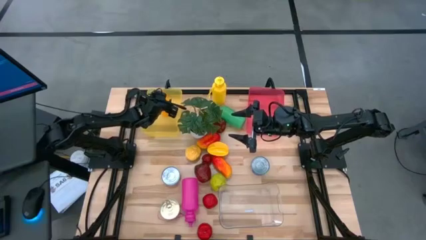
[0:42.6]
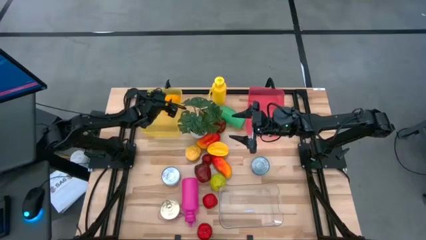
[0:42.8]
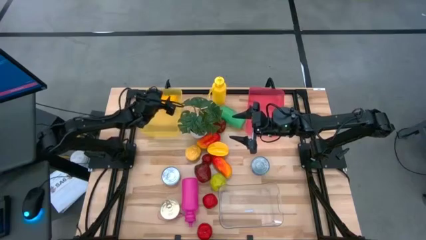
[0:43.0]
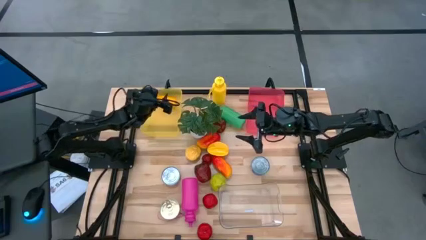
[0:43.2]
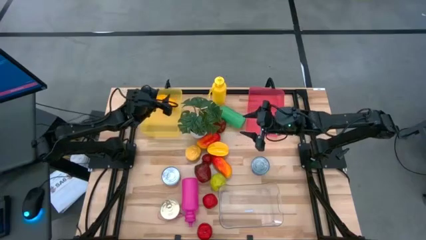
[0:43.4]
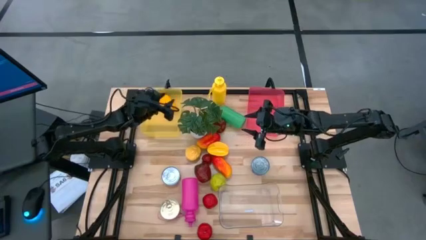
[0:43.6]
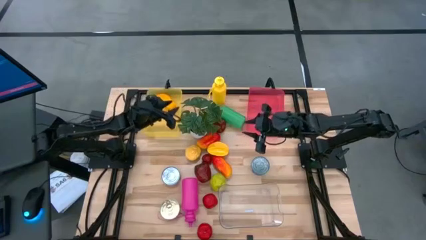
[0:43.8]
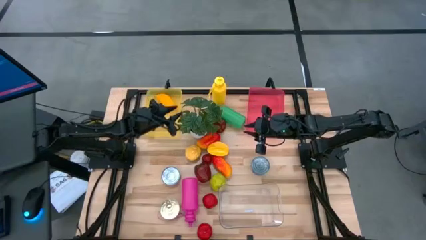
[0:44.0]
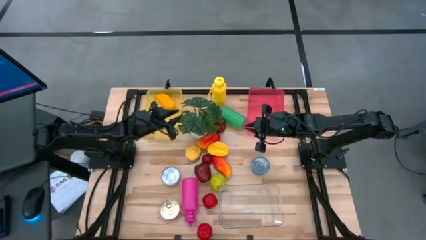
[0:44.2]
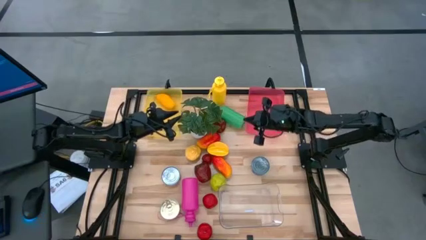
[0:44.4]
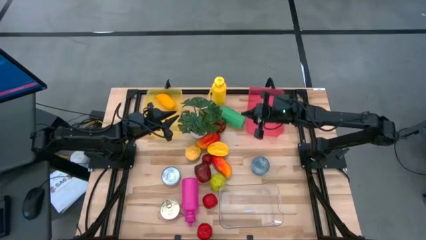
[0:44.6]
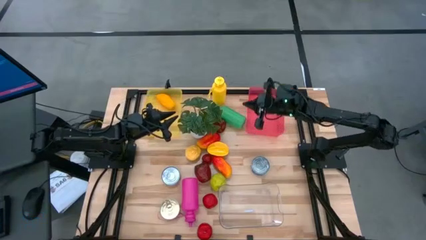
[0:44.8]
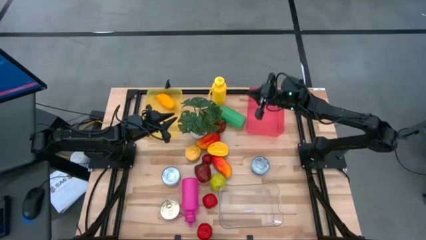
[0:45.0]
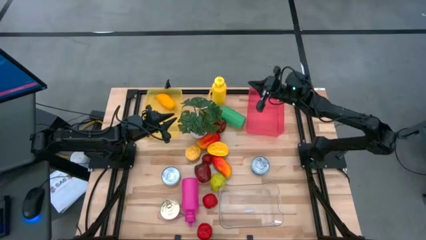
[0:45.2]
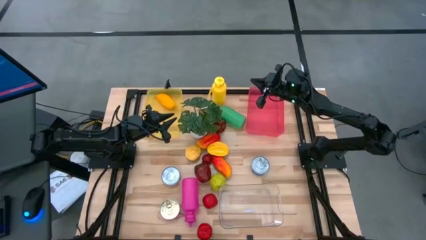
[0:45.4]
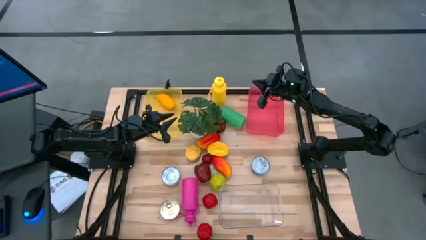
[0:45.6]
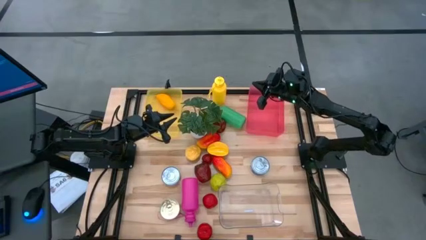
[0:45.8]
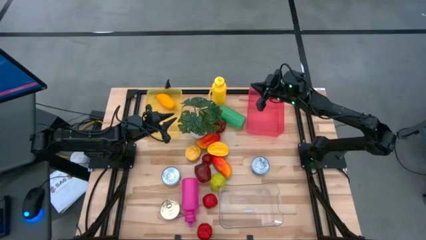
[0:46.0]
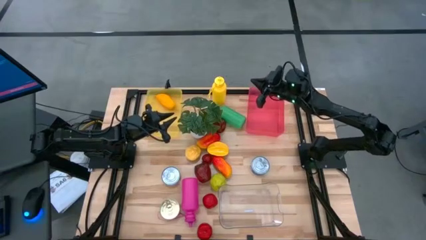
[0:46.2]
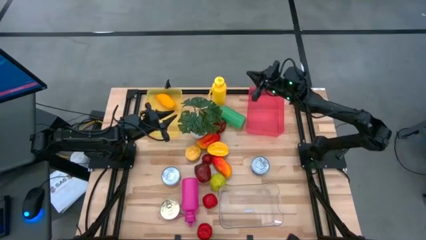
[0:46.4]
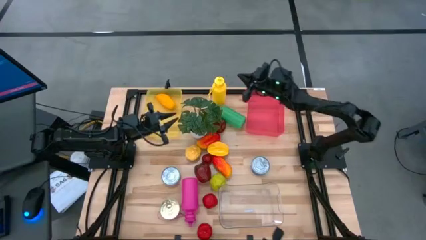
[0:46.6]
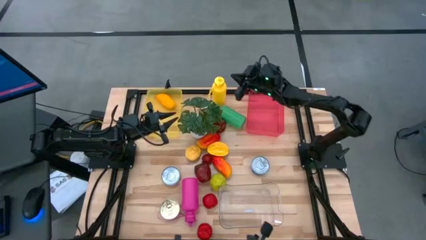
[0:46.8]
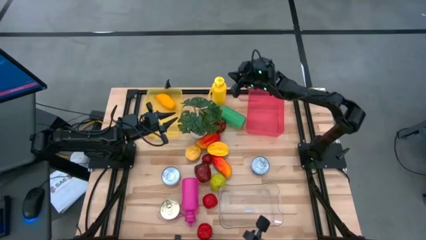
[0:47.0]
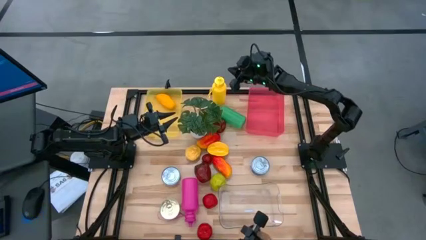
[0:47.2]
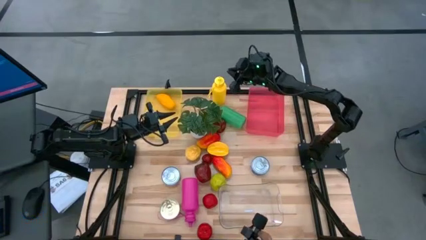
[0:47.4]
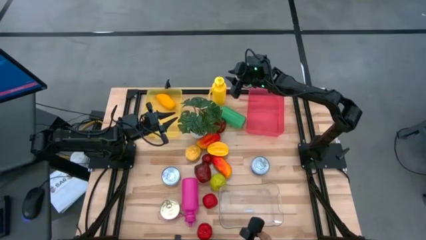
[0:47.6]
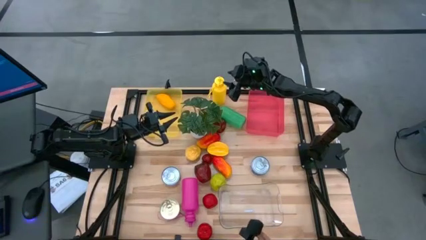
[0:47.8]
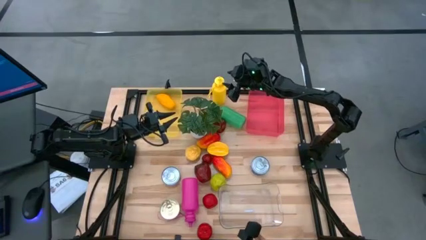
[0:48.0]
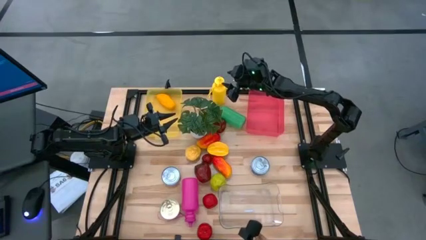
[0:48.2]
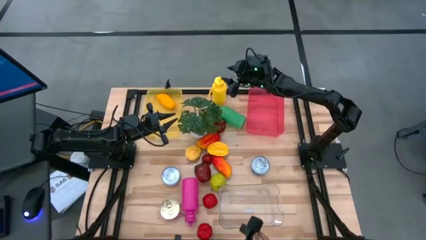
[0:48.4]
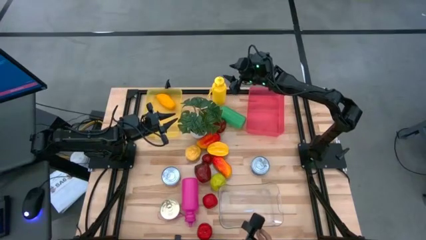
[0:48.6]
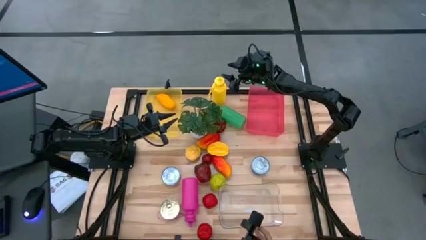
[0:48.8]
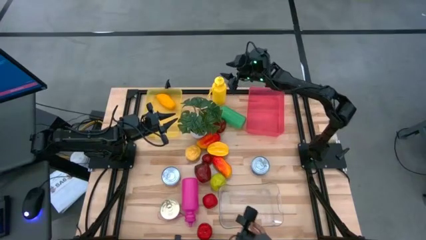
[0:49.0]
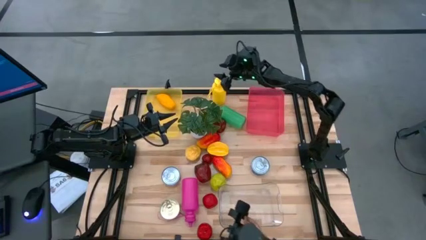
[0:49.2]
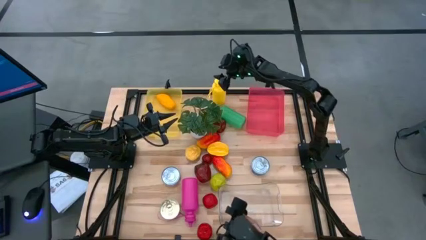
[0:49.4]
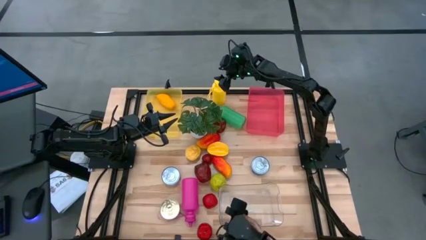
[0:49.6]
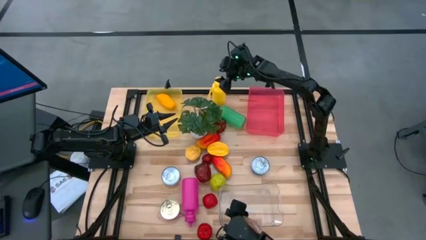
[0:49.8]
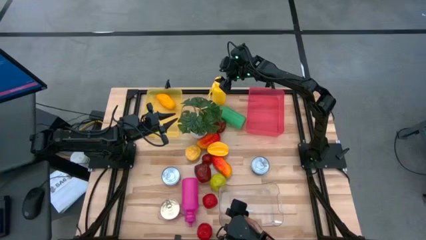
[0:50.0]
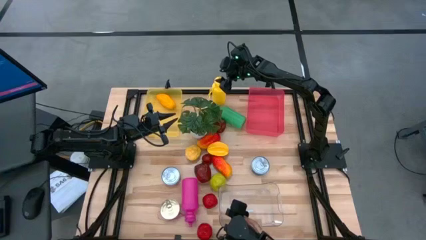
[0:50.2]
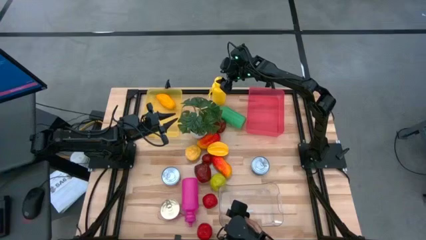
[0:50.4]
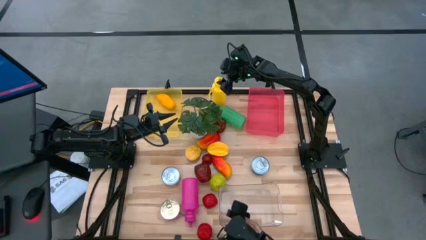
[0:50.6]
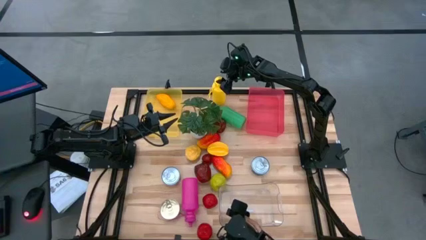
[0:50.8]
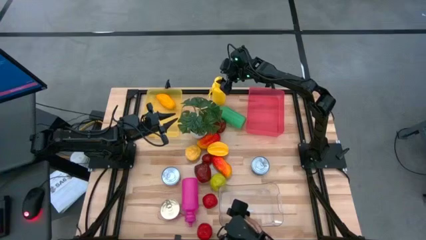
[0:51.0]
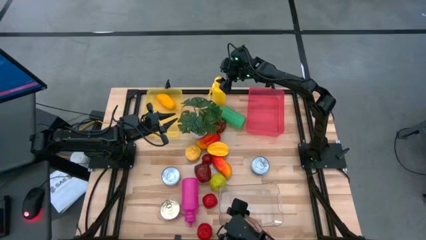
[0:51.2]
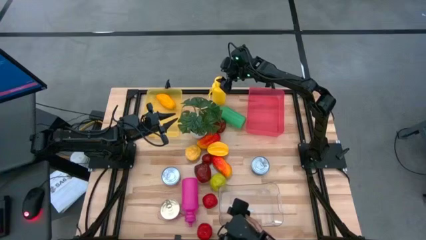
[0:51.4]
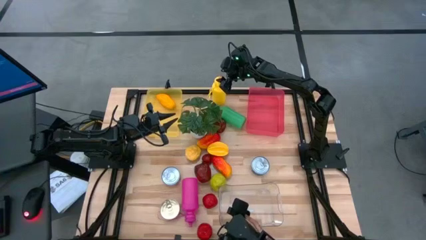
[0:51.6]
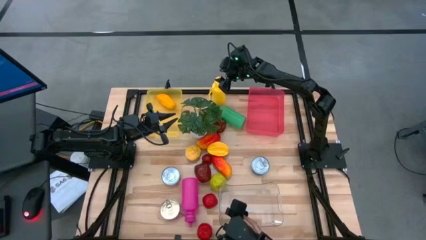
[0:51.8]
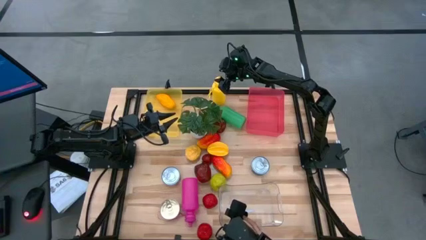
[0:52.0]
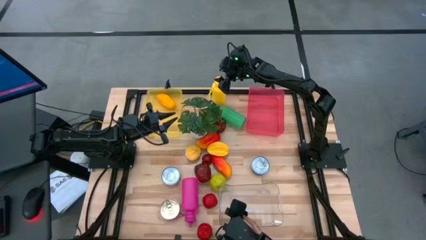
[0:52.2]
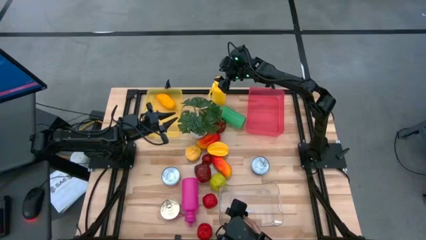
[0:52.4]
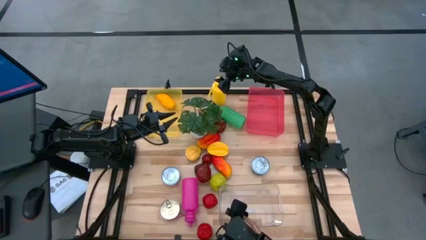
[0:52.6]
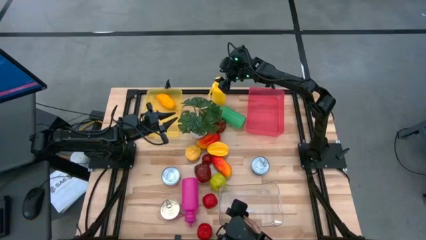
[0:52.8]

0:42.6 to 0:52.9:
Task: Pick & Place Food Item
Put the yellow water bottle into the pink bin
